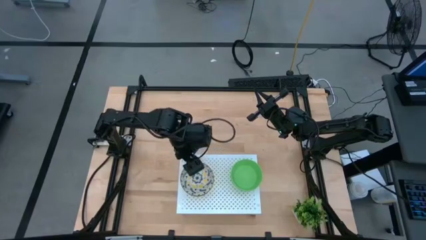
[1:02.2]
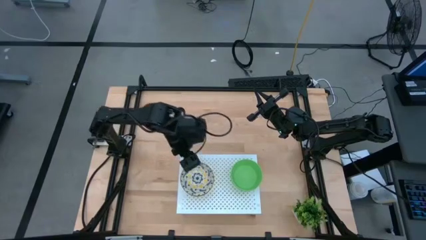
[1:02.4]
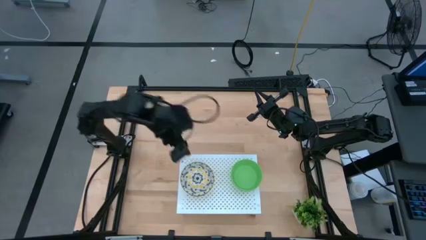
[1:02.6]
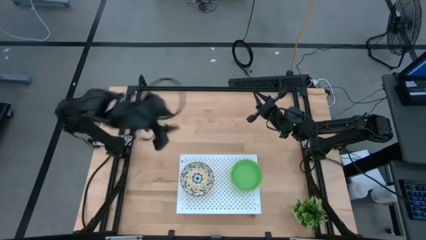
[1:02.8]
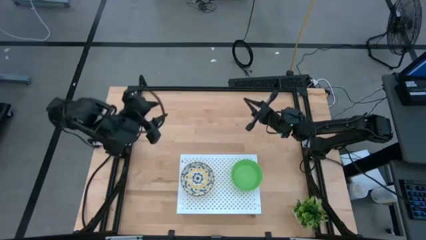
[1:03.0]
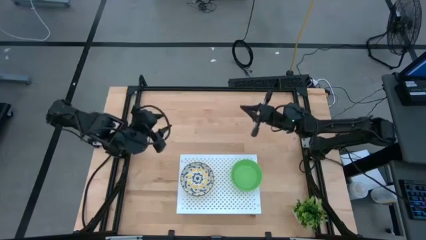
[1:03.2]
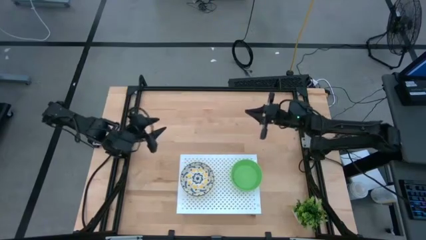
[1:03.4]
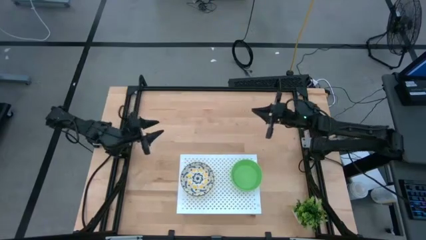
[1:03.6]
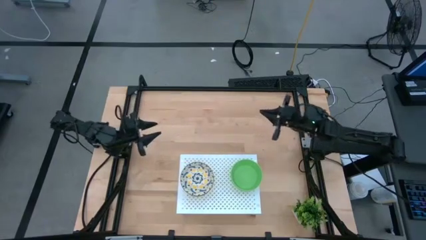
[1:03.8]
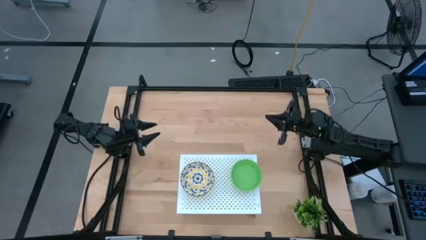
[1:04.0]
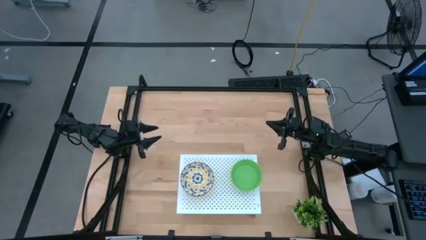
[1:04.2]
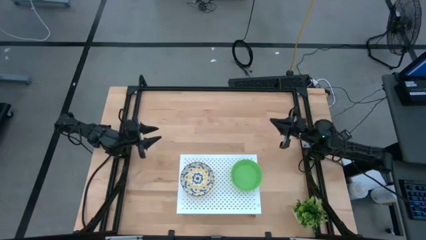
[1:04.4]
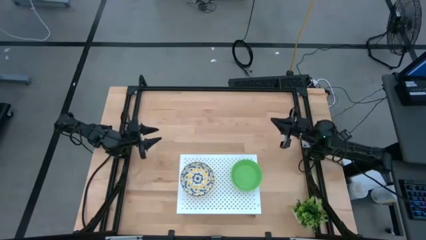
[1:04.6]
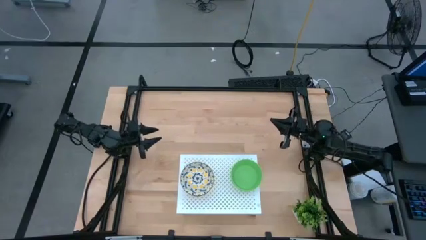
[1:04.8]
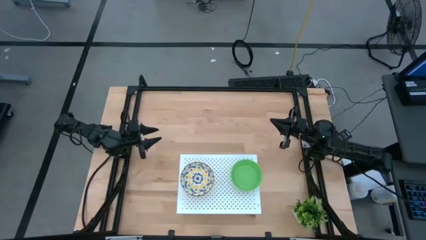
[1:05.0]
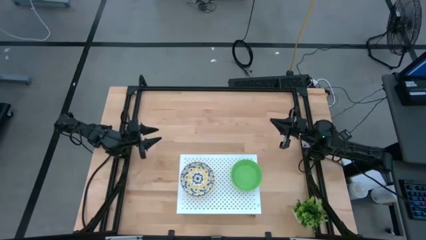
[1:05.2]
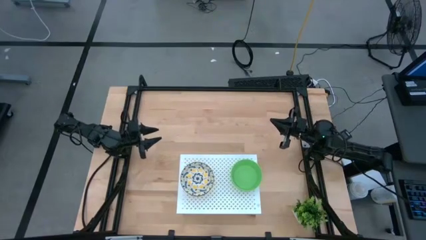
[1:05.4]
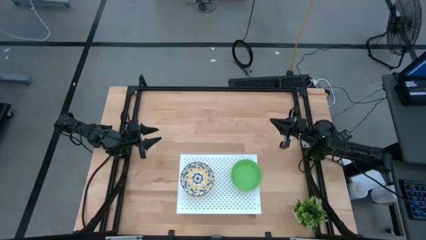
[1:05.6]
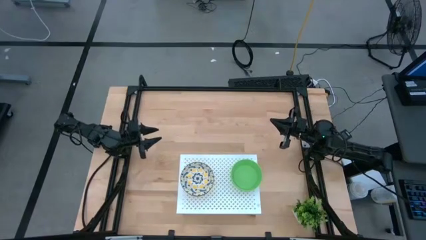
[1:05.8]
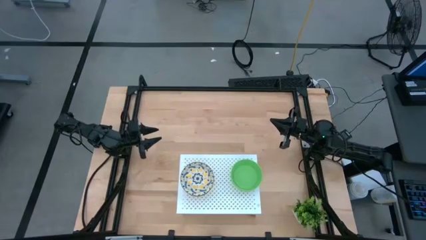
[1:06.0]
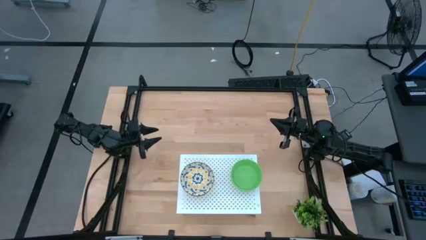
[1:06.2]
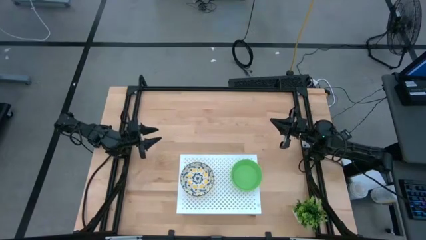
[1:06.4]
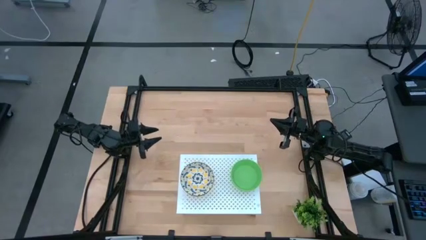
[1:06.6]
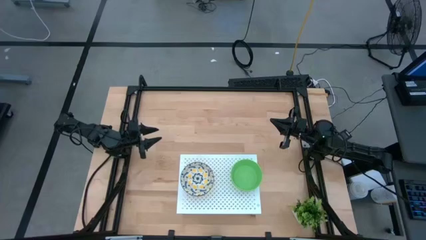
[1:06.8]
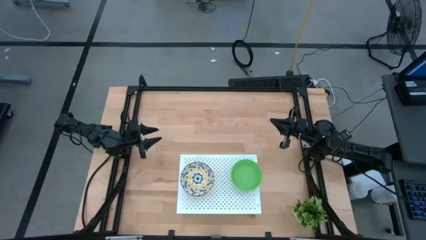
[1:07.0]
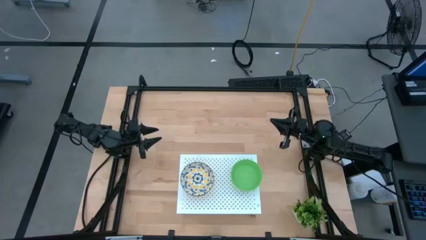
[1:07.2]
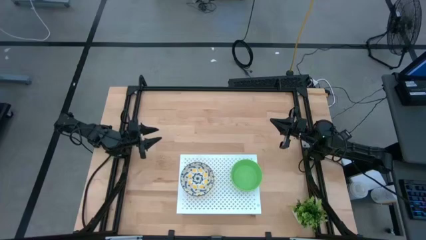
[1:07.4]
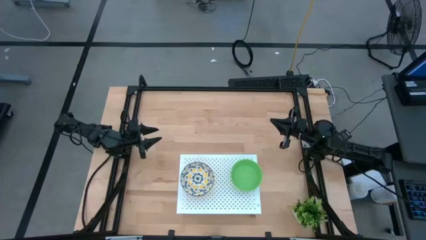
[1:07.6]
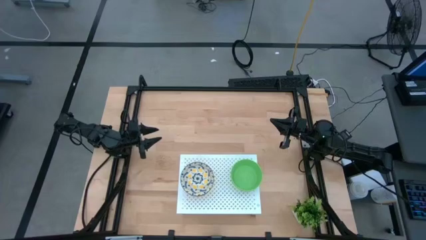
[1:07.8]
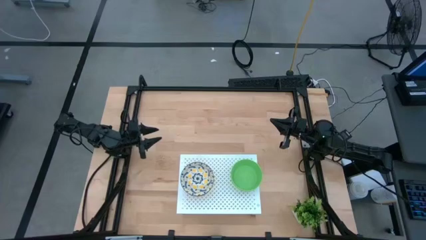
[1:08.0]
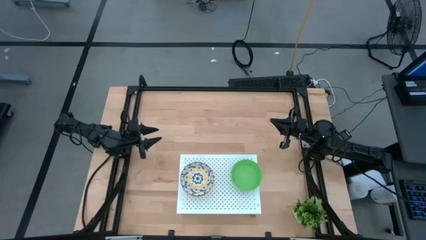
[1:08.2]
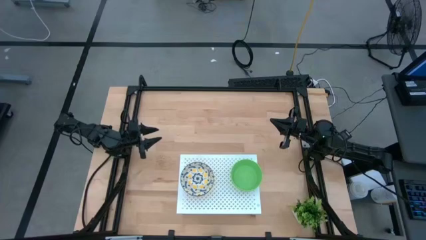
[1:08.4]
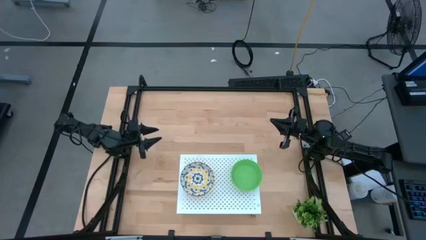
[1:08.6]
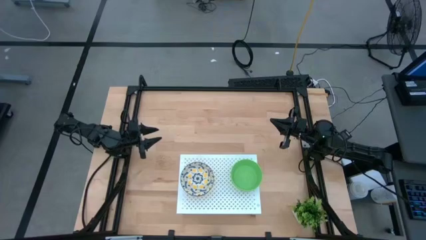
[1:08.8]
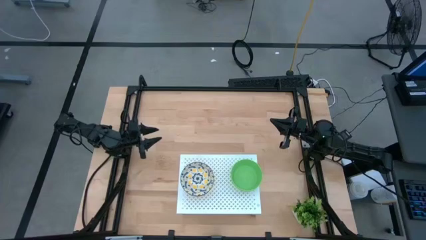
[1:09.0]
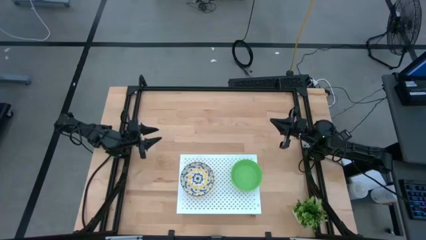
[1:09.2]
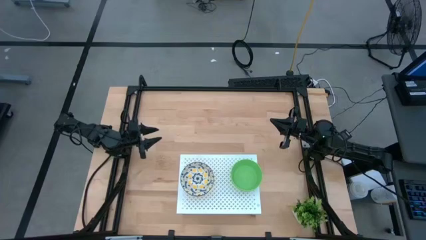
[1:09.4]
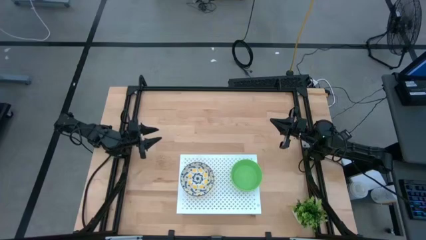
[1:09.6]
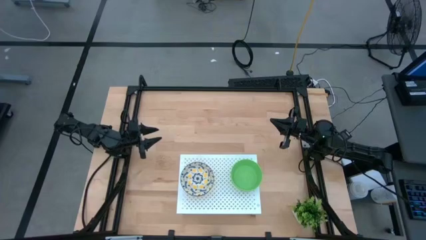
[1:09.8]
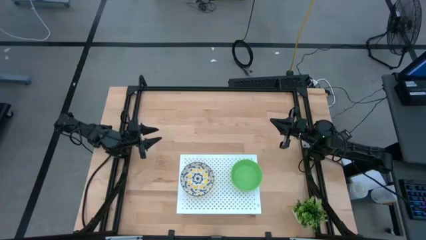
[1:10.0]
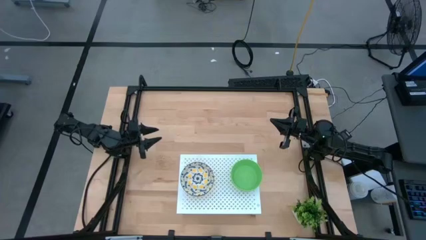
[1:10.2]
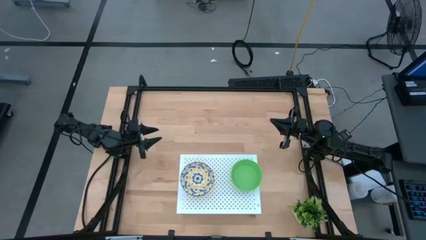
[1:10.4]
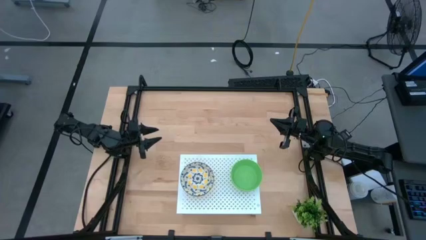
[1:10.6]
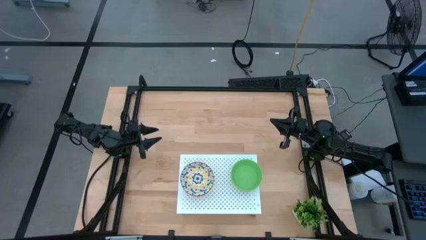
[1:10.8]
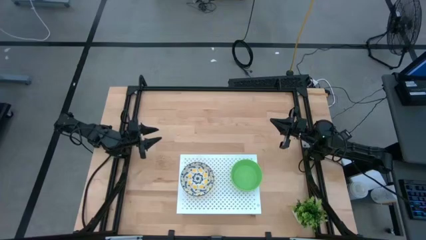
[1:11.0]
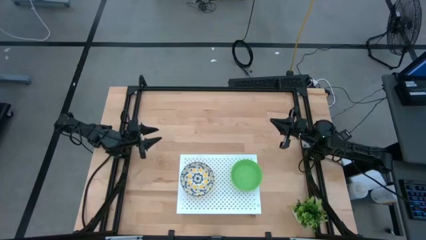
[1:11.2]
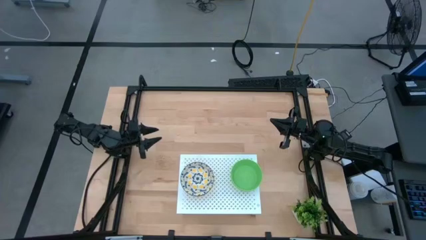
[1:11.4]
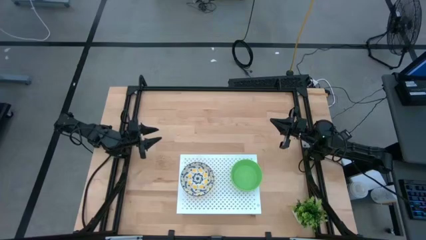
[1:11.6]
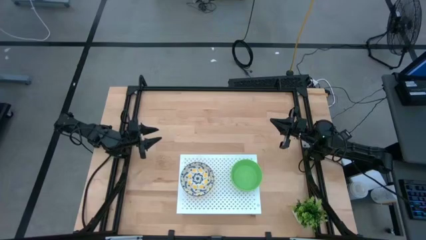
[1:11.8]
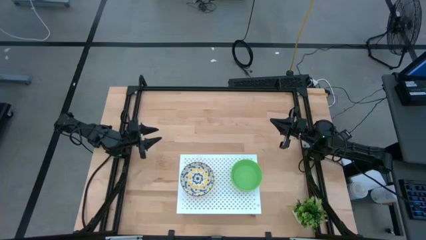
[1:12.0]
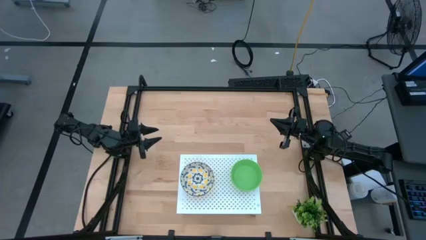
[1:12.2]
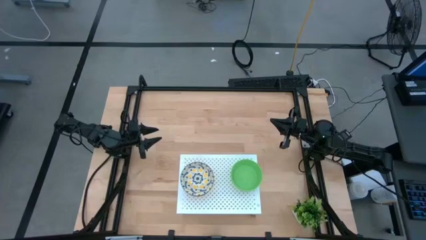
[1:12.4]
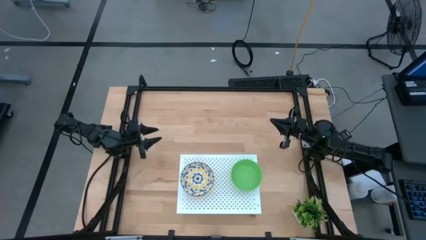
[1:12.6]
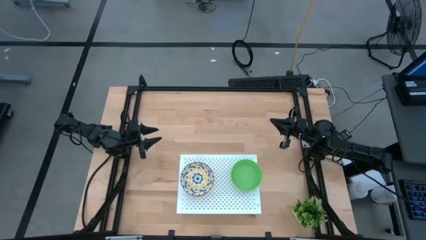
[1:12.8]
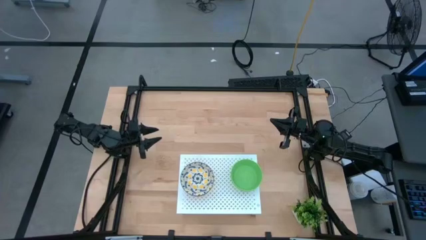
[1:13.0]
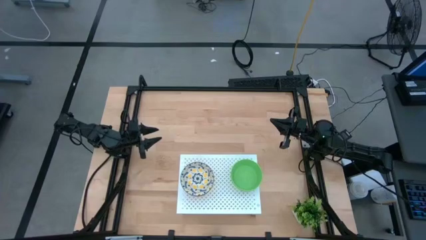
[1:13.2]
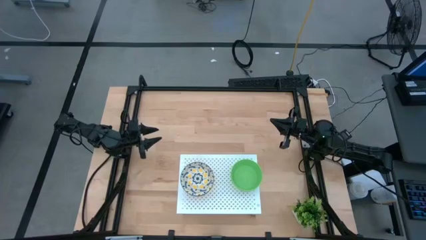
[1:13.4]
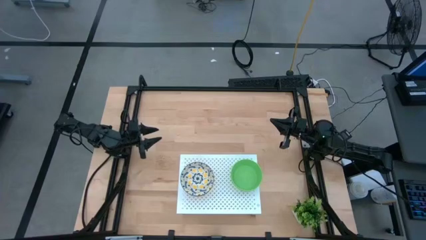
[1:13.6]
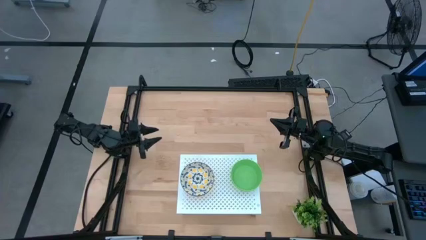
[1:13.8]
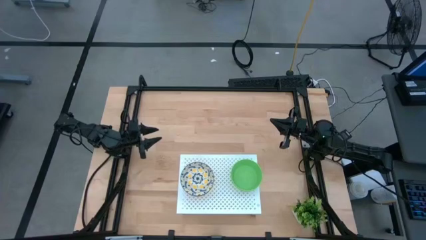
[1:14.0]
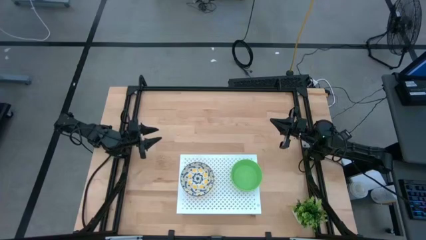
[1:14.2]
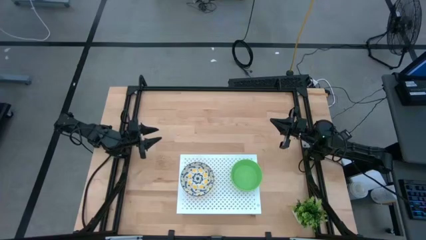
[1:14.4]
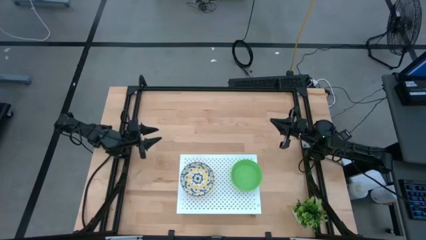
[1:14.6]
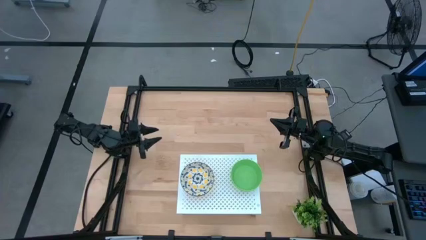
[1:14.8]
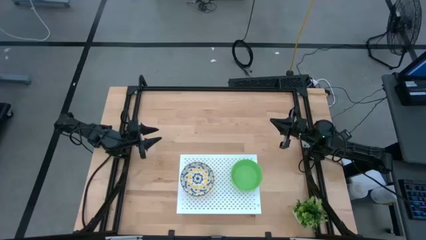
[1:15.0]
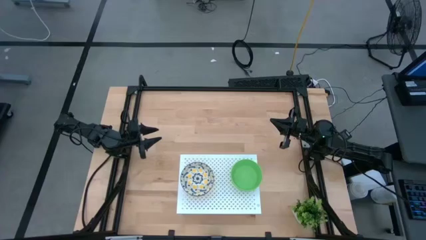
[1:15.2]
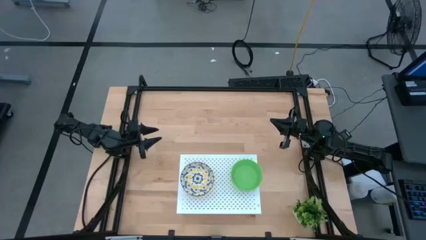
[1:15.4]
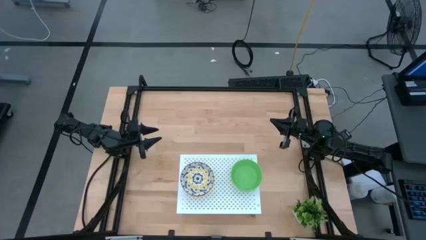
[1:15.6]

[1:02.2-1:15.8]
Task: Pick & Place Mini bowls
Return to Home Position
